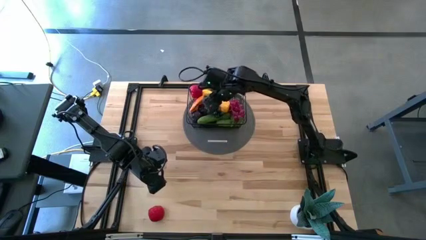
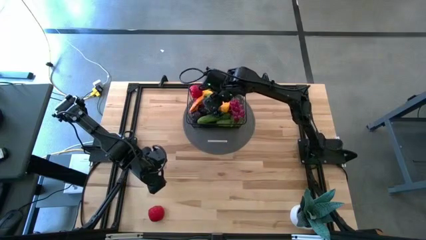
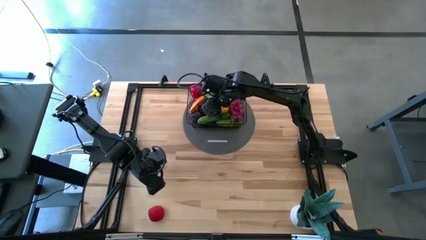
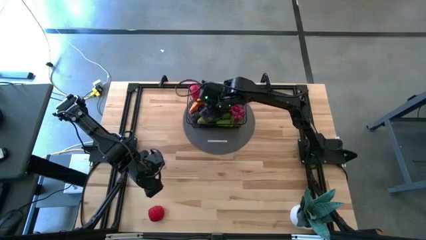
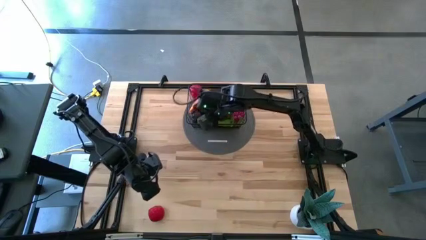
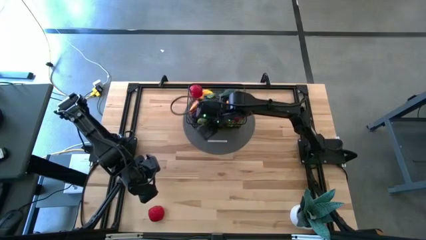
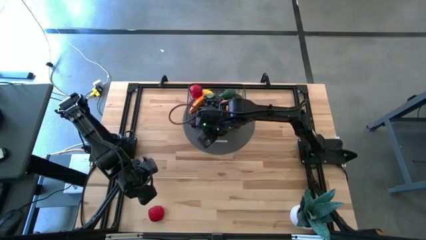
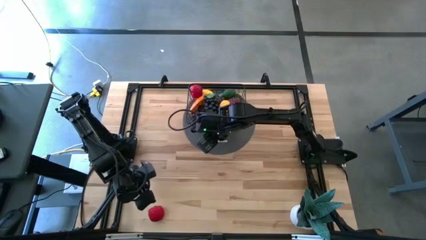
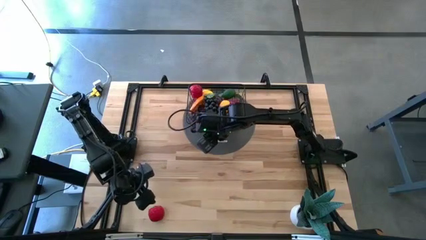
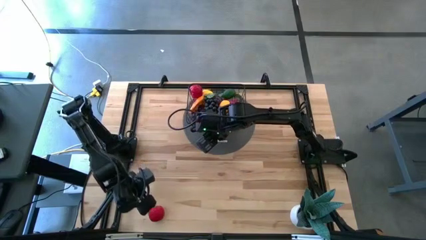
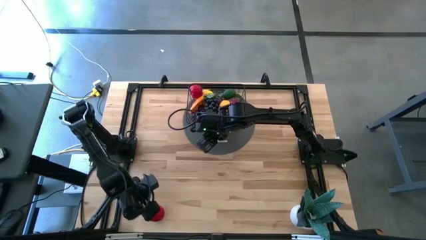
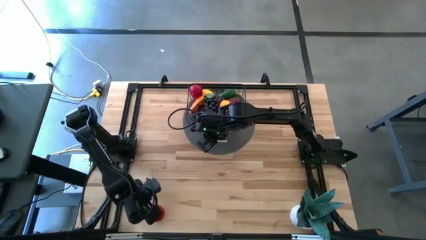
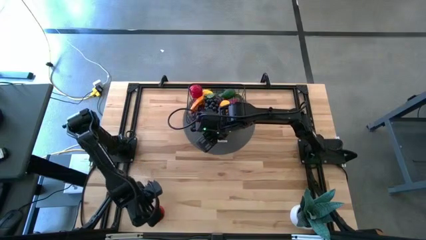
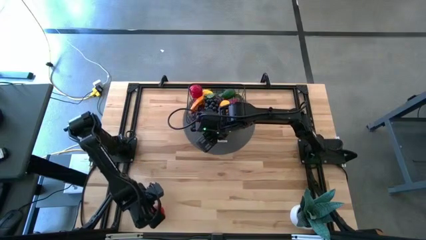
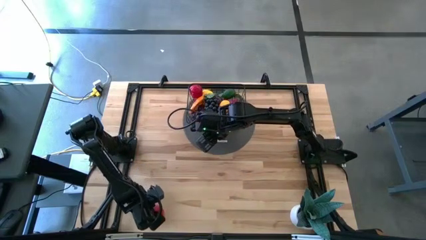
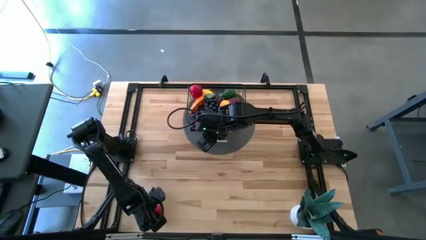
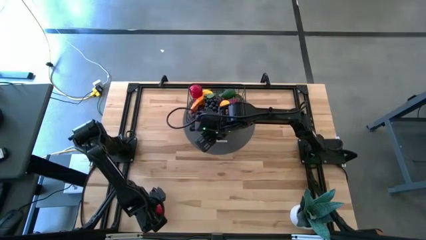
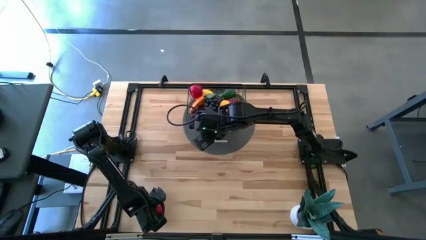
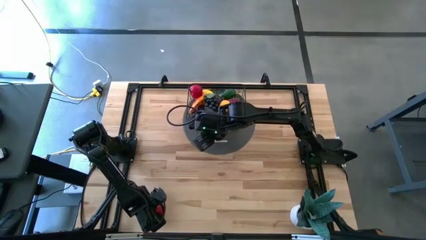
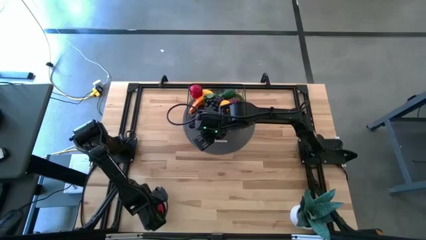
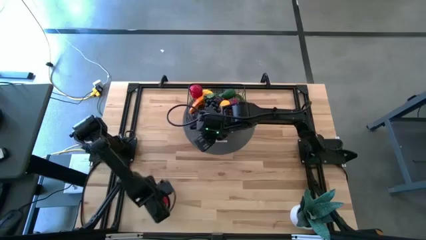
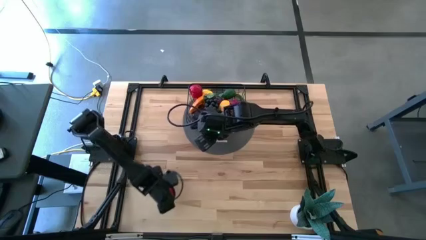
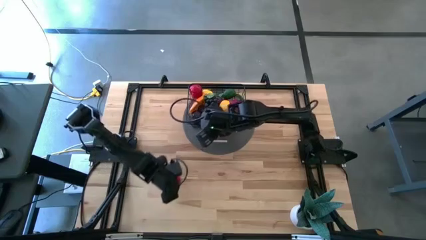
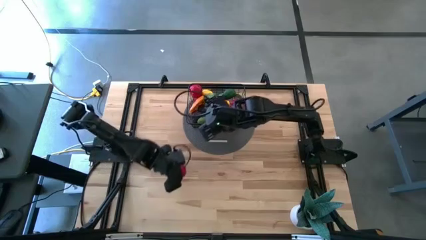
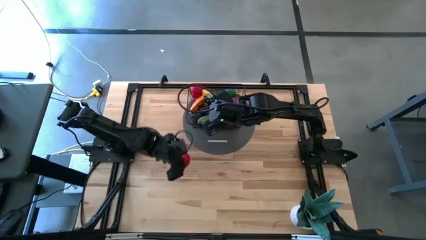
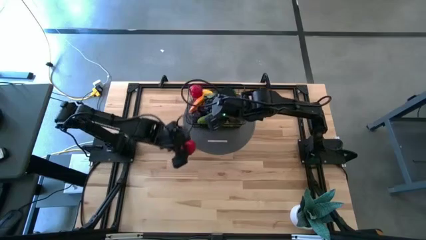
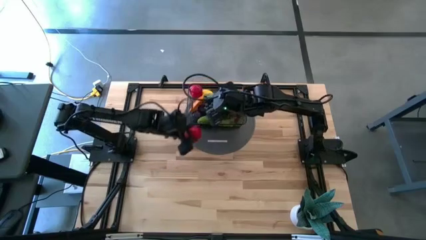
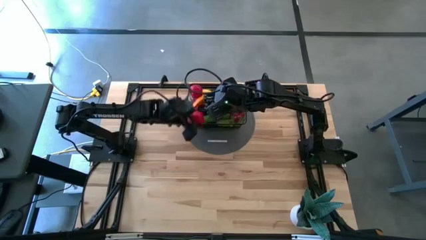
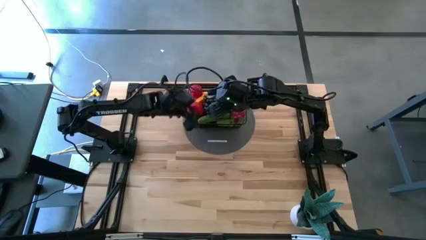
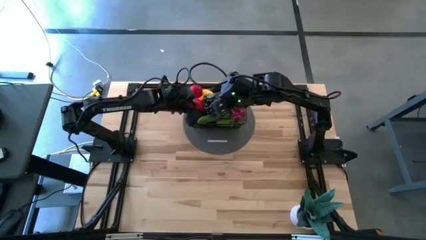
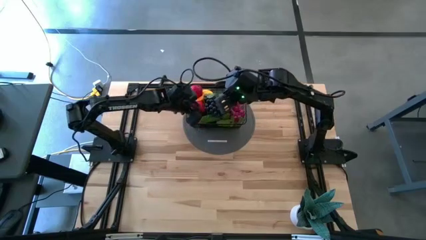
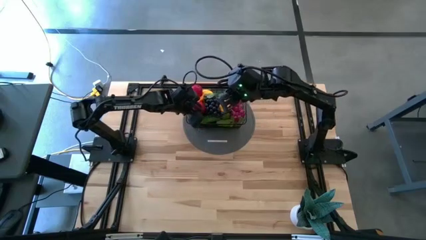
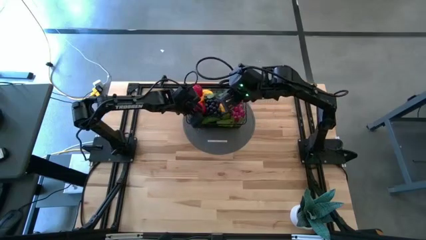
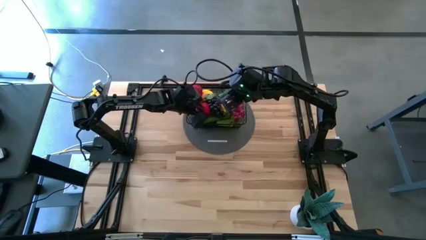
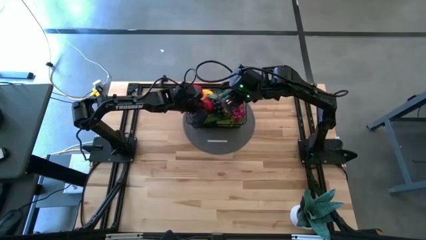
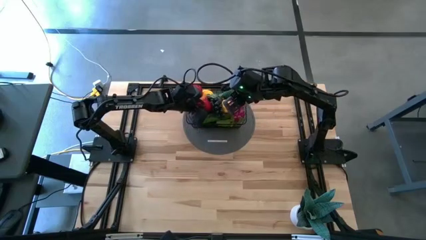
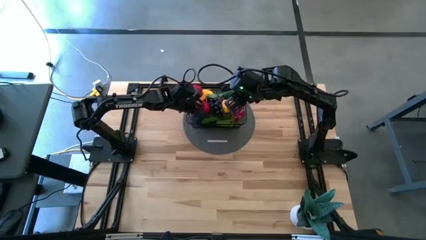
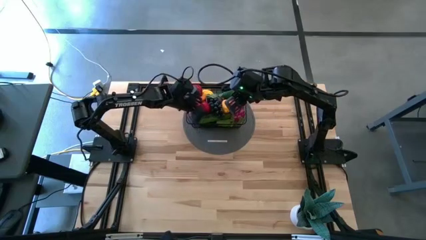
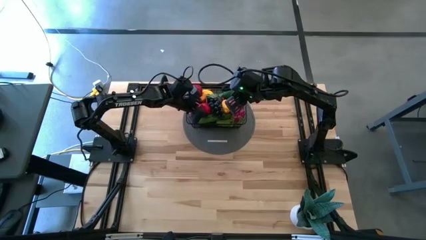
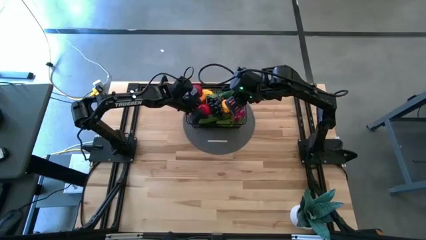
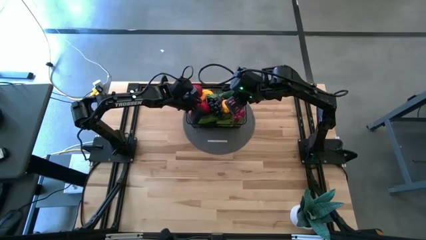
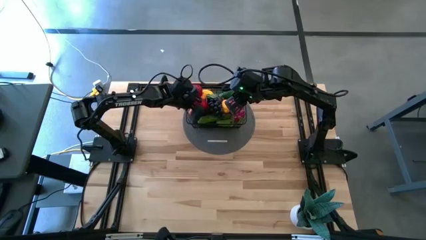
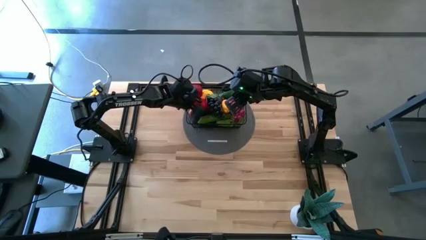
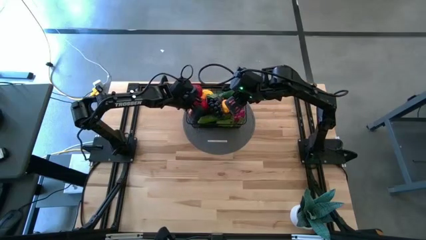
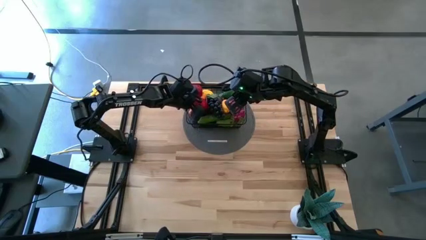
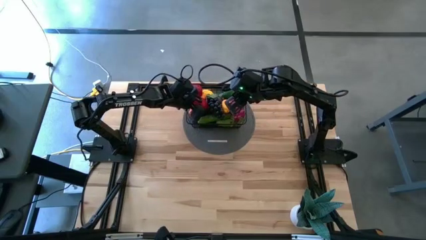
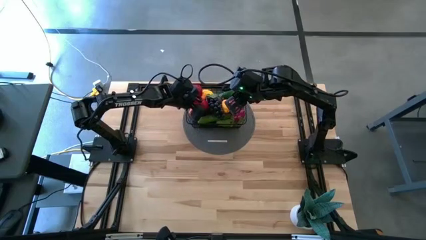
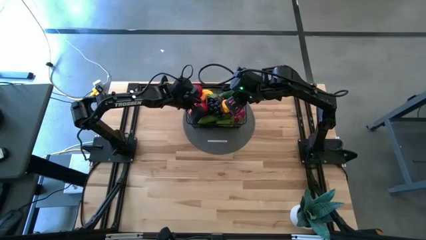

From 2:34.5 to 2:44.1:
Task: Build produce basket
Put the red tomato into the black wire basket

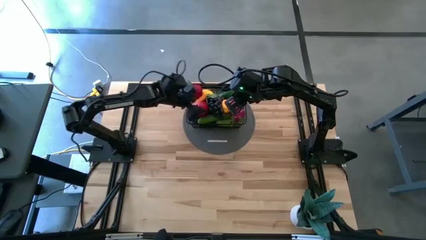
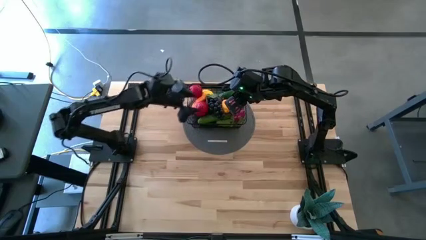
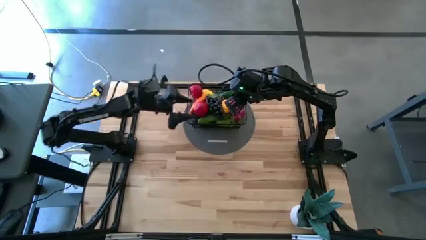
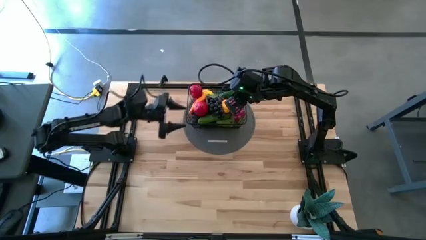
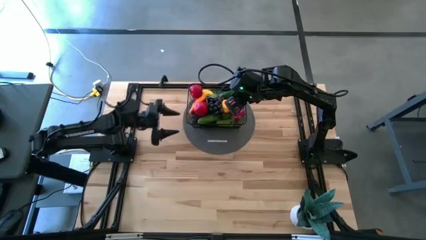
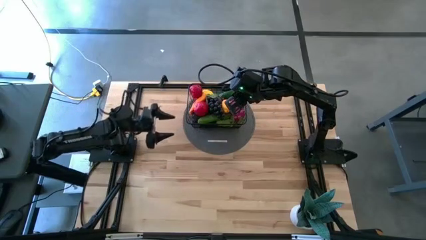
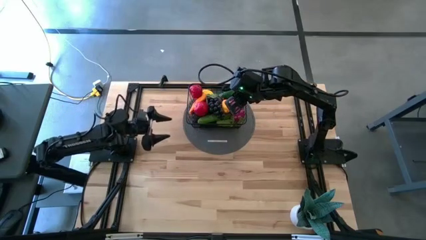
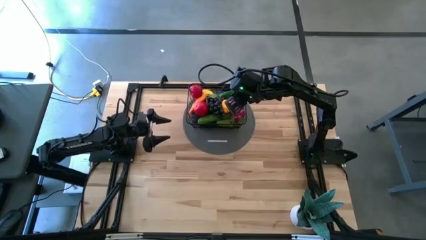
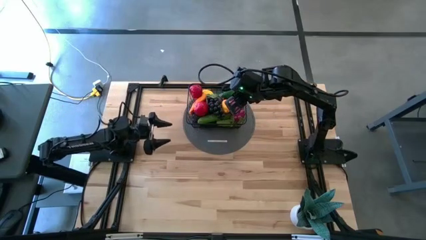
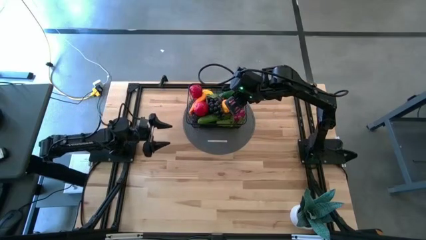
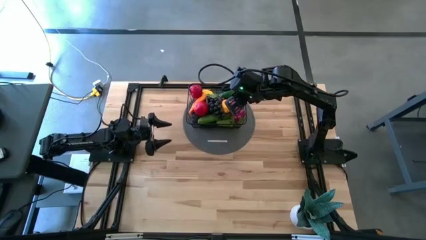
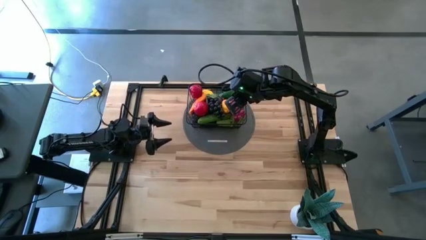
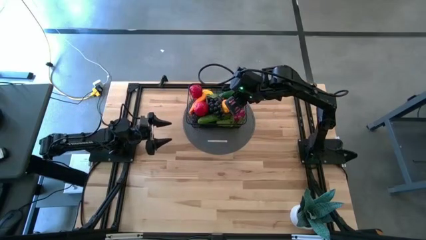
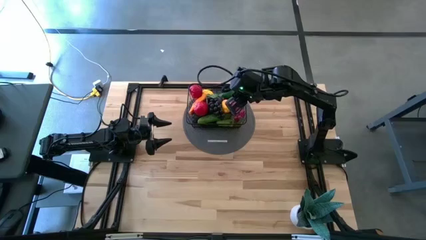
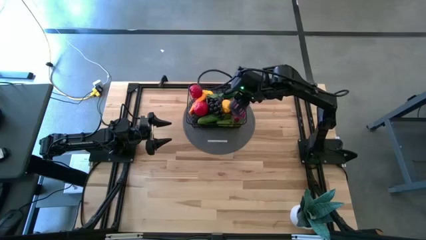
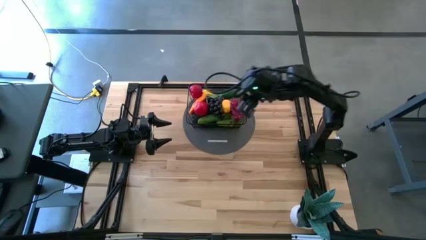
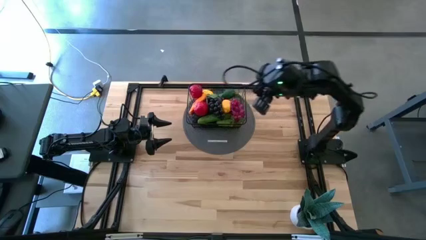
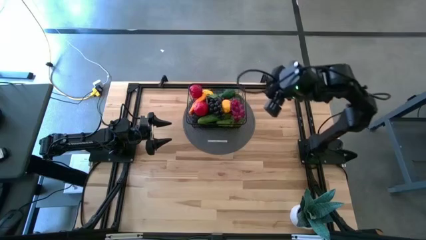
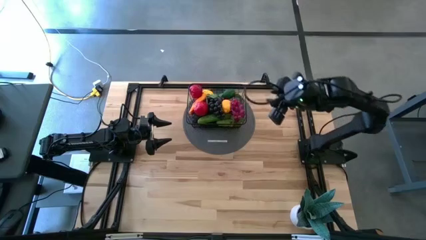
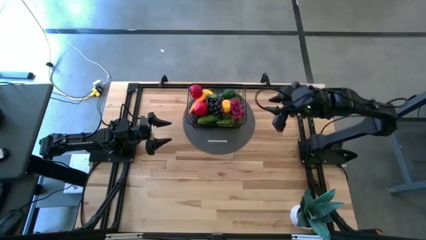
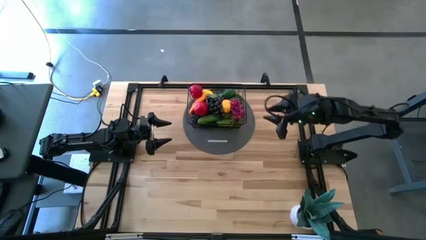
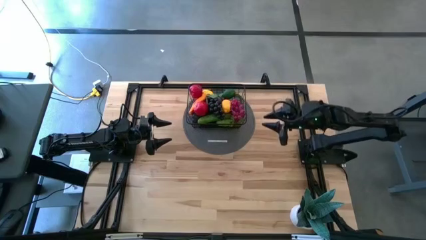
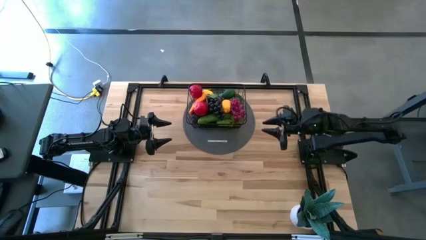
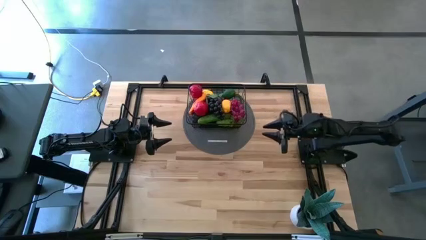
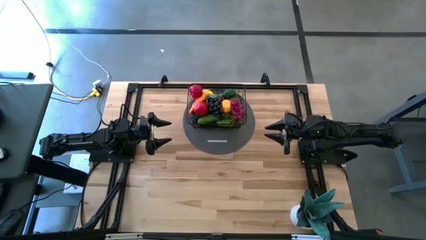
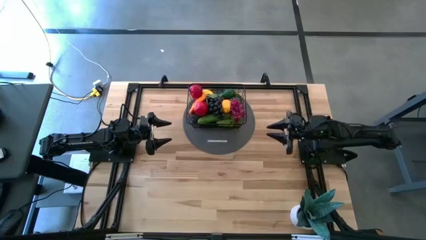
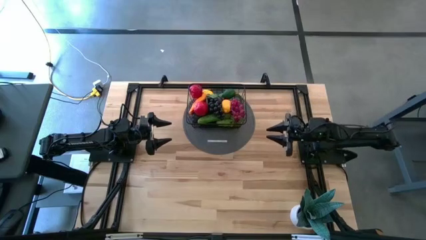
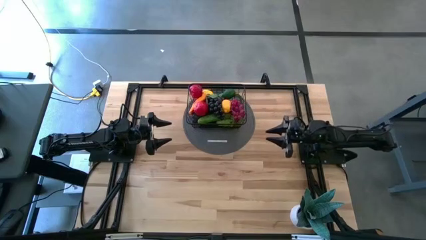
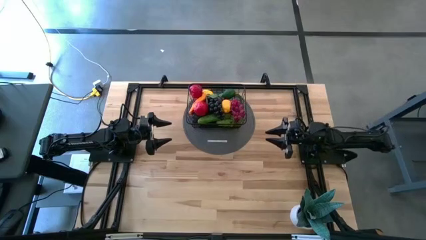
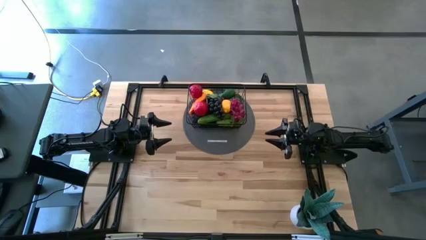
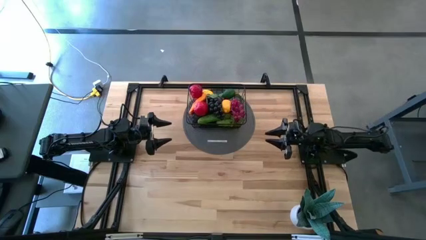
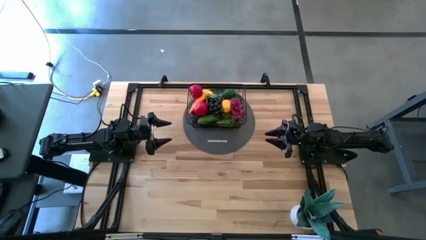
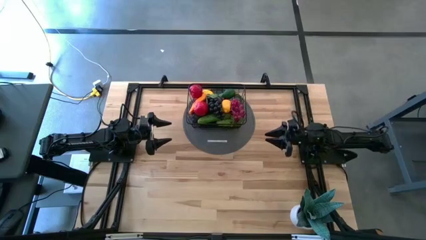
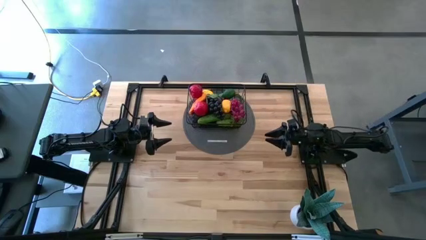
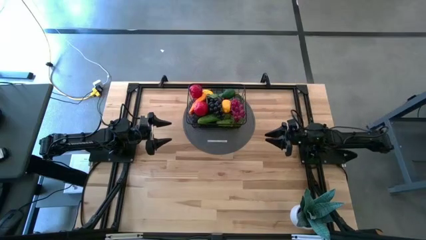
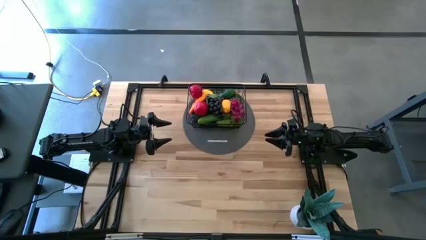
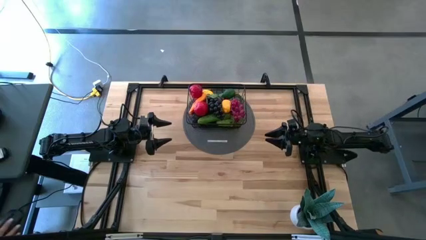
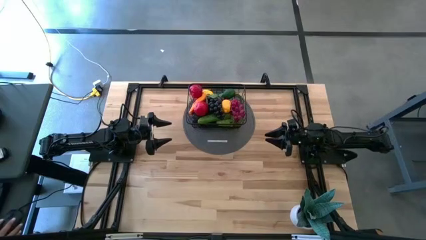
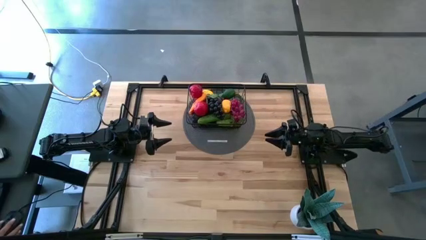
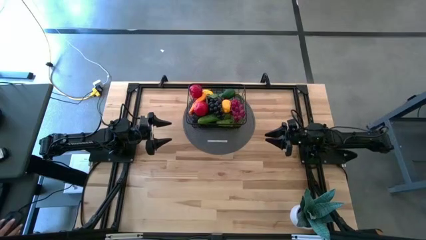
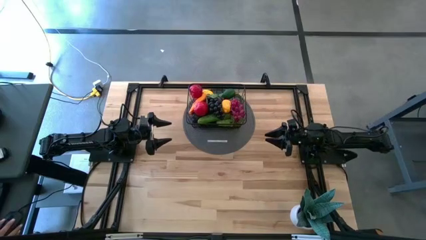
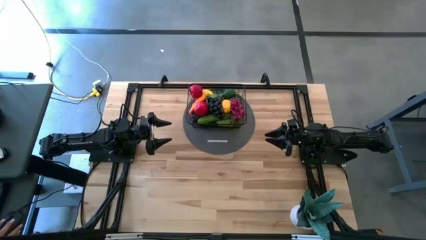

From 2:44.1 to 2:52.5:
Return to Home Position
